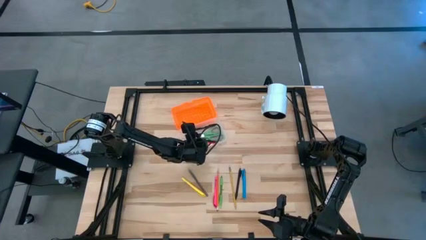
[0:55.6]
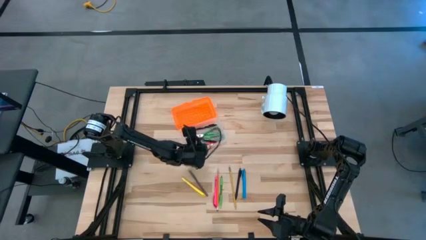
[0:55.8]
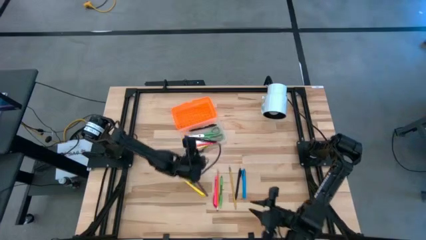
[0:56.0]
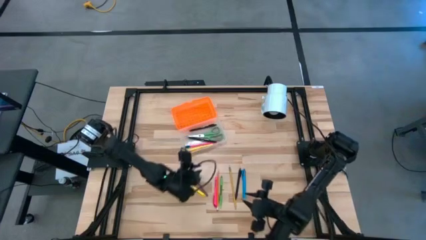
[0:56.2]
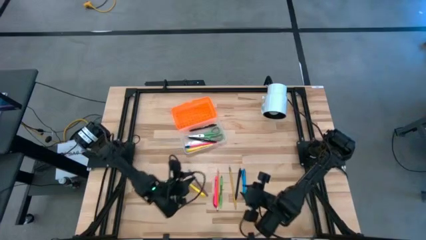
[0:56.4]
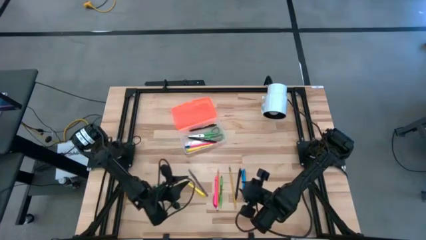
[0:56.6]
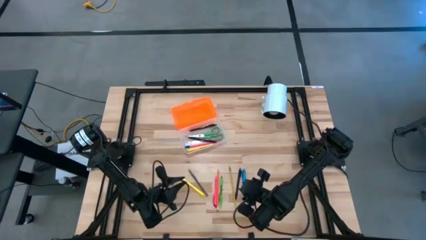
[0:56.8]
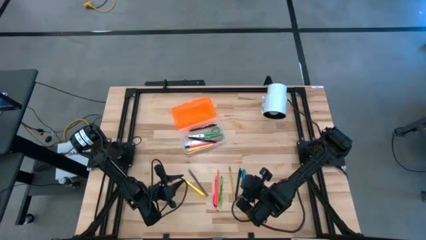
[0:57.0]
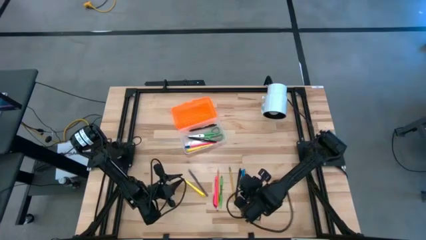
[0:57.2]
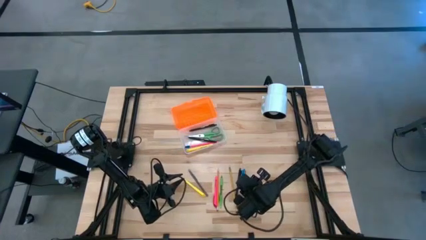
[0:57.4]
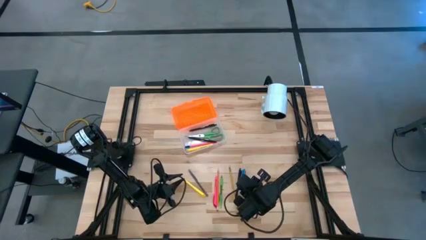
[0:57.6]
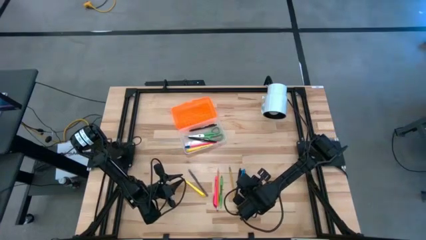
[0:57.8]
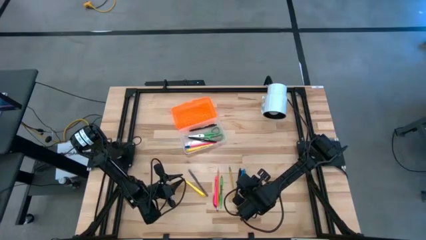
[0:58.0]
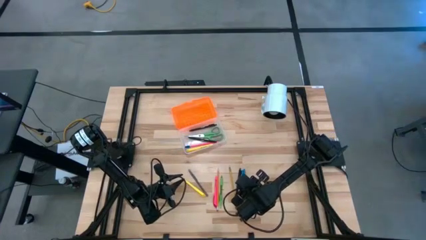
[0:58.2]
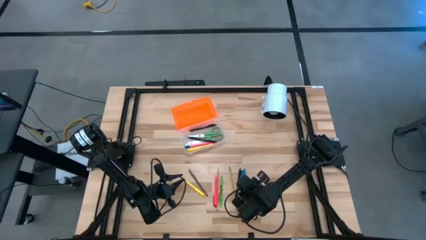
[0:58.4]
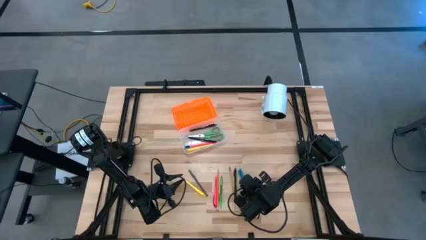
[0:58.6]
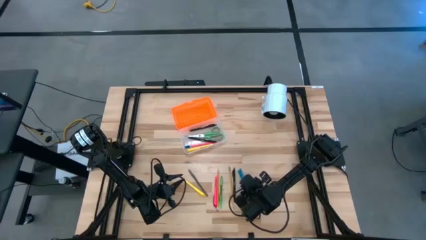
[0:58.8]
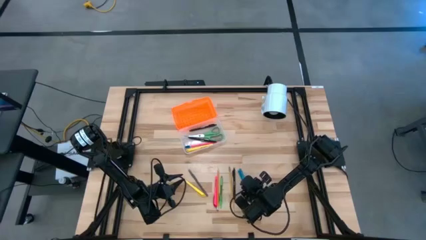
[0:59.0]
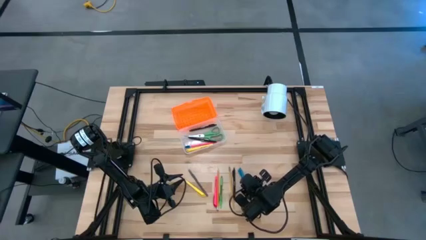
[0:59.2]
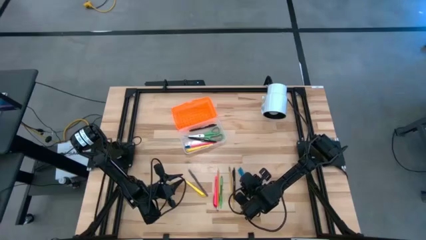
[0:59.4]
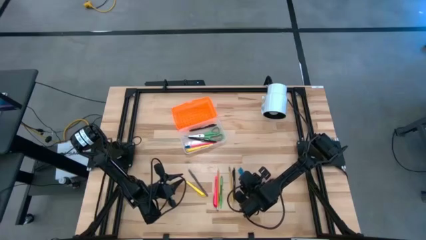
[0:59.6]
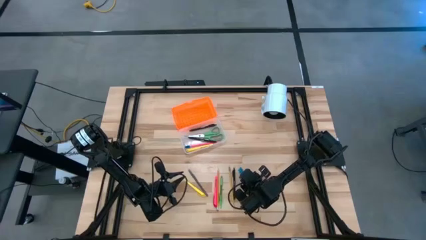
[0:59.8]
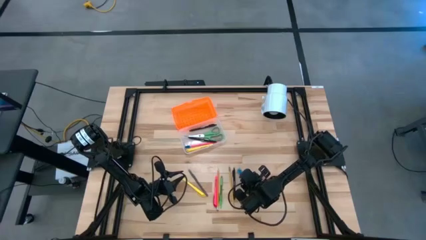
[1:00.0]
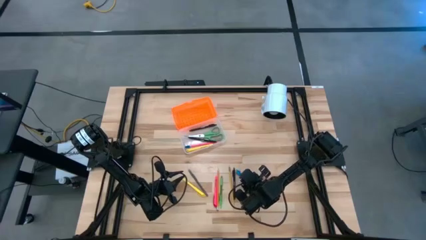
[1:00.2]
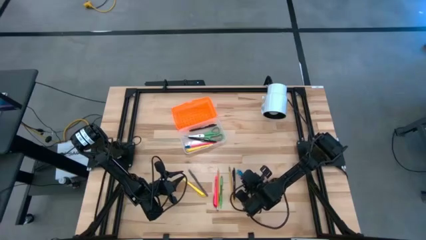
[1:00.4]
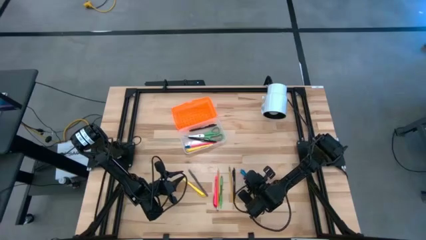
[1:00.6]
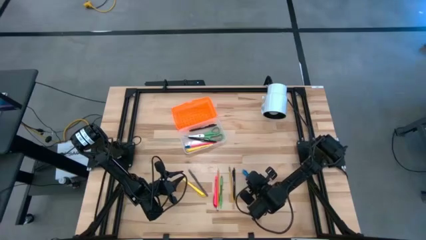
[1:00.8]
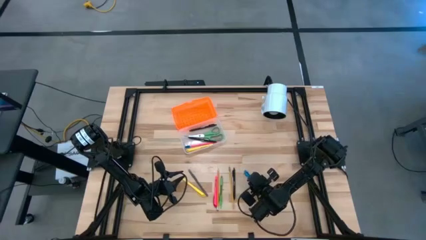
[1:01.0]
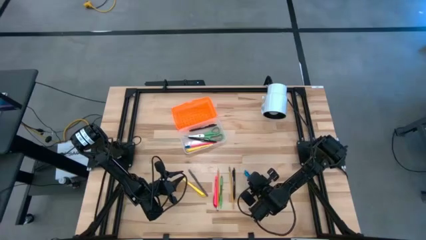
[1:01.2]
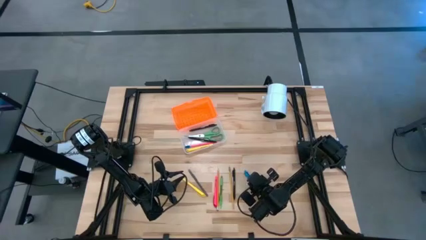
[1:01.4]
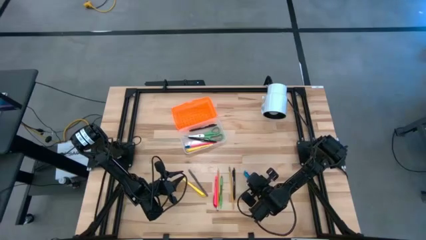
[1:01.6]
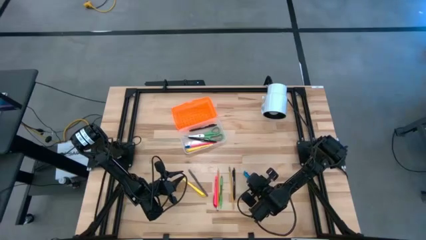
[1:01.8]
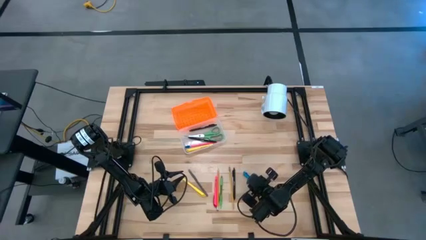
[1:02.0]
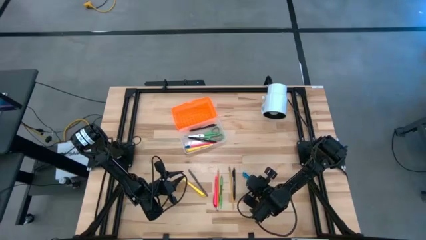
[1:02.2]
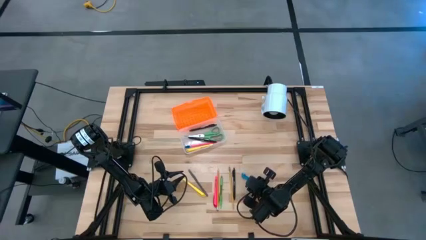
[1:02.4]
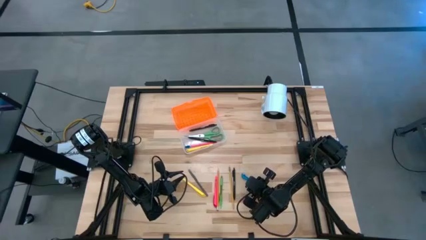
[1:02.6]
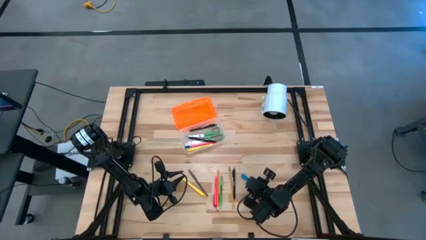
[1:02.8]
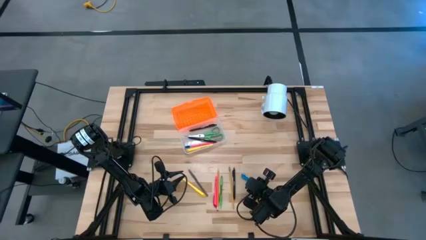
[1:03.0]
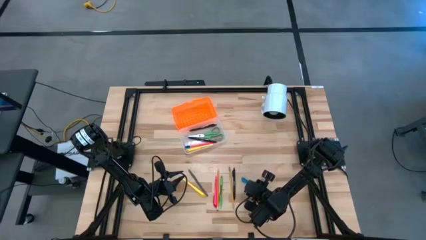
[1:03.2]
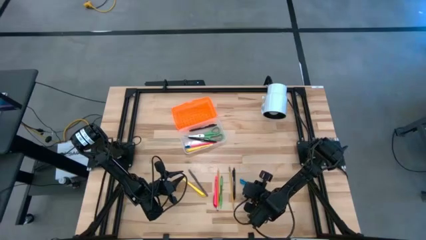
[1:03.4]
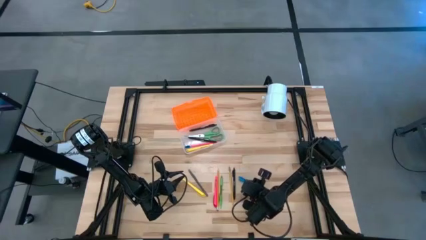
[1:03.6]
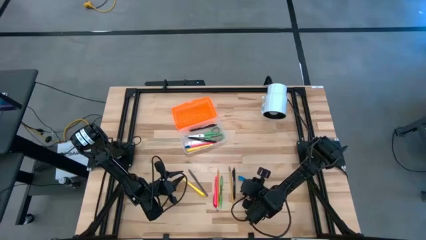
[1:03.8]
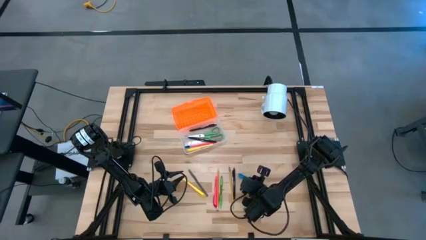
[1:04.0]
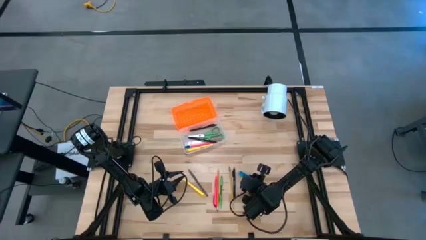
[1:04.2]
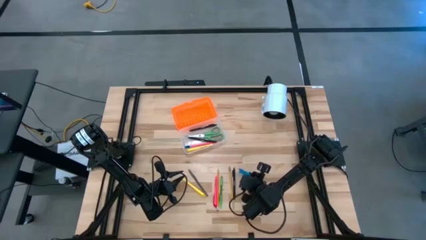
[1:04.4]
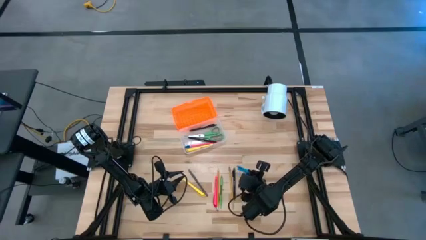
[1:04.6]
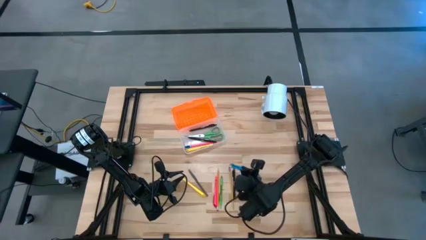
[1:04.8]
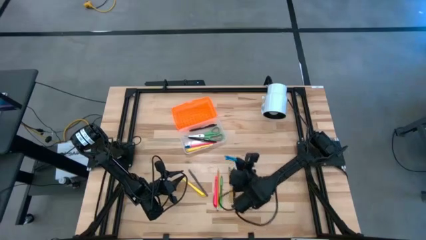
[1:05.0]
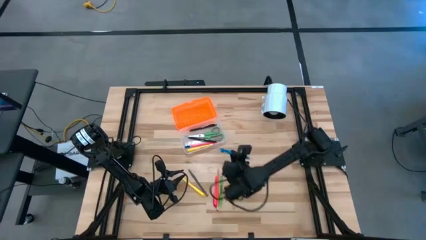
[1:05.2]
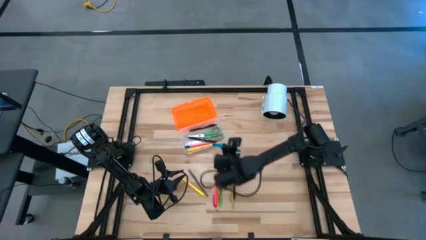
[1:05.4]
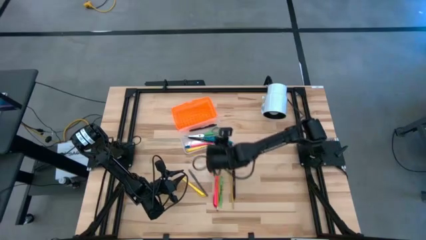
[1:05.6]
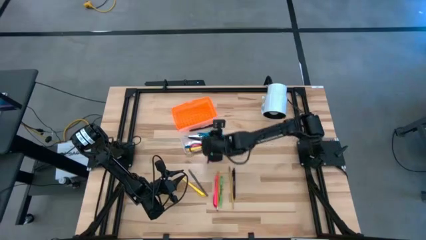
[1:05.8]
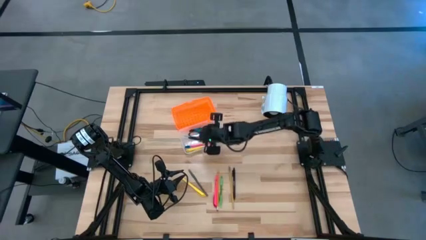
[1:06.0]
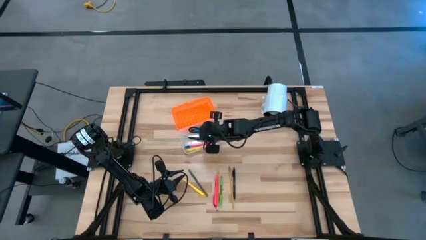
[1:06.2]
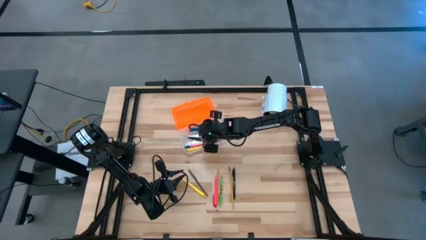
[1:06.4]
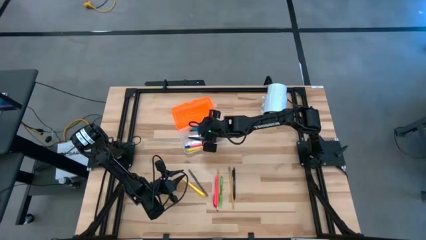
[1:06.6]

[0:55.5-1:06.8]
Task: Pick & place school supplies into a supply box
Put the blue pen into the supply box
